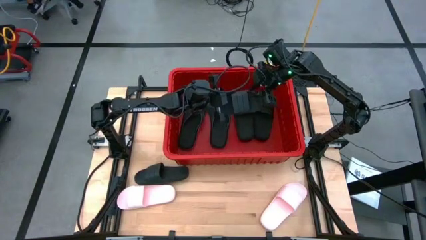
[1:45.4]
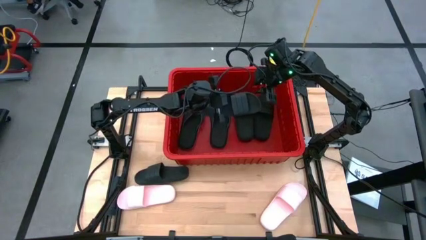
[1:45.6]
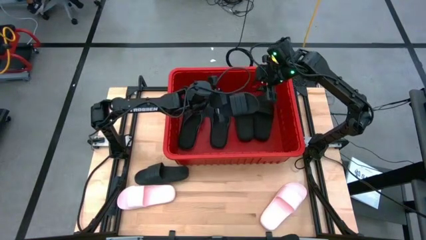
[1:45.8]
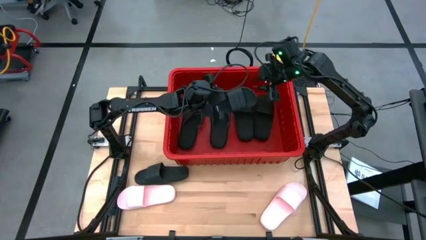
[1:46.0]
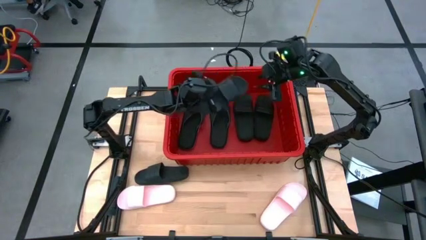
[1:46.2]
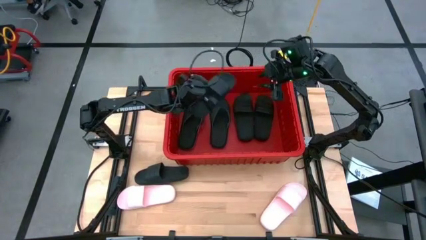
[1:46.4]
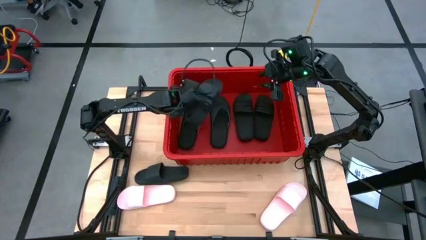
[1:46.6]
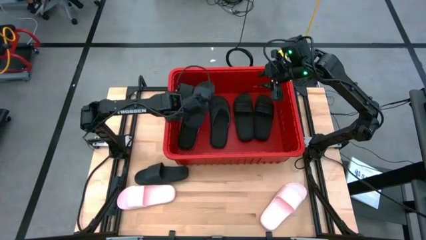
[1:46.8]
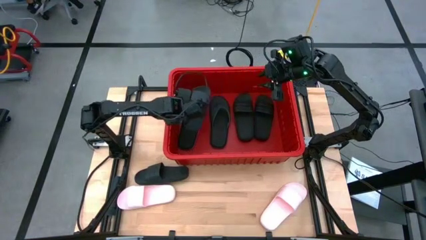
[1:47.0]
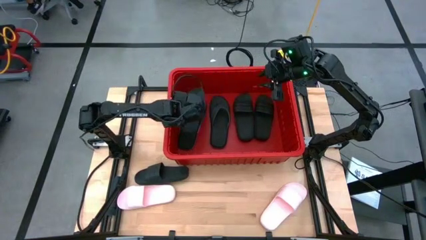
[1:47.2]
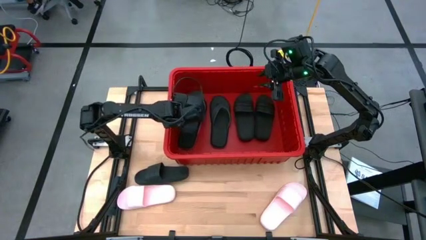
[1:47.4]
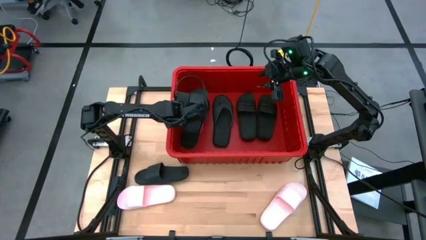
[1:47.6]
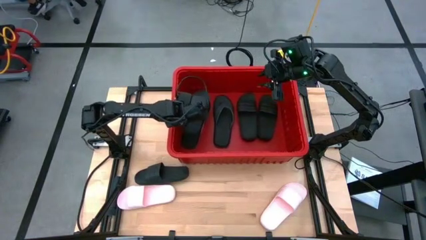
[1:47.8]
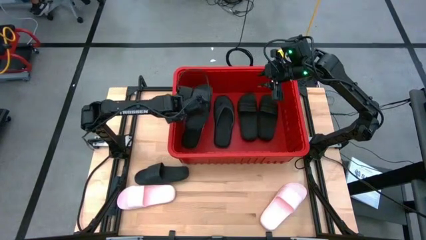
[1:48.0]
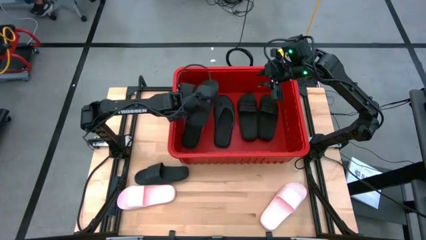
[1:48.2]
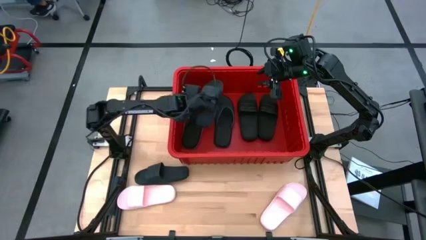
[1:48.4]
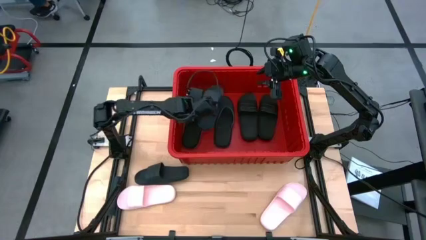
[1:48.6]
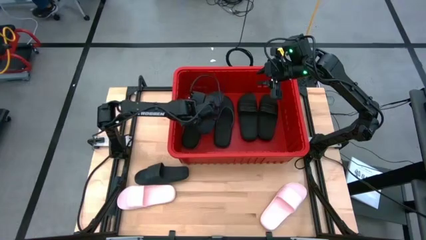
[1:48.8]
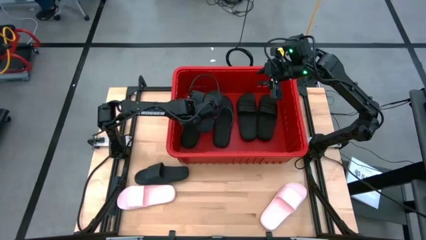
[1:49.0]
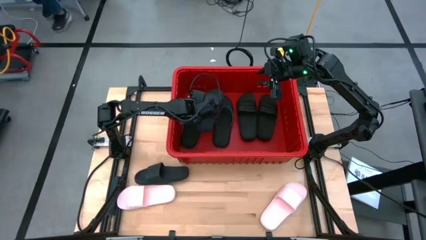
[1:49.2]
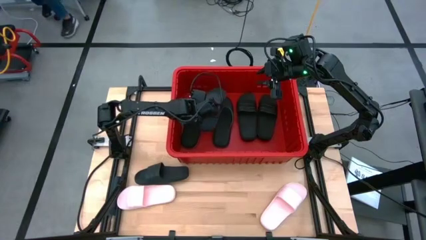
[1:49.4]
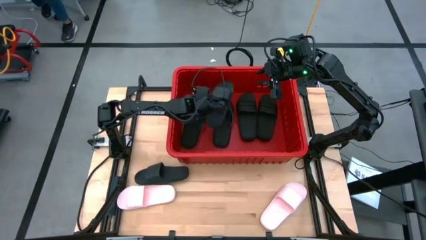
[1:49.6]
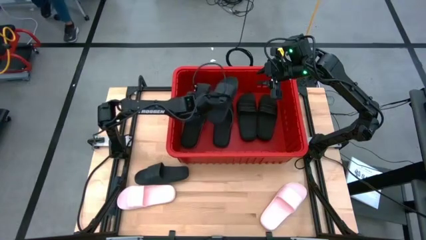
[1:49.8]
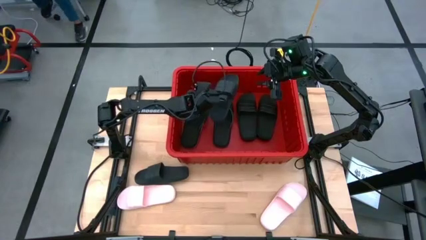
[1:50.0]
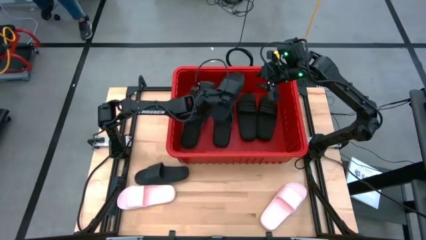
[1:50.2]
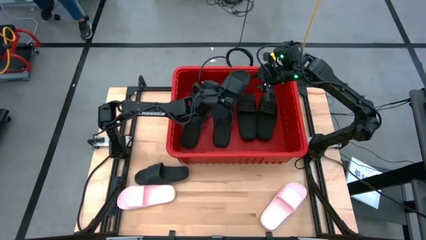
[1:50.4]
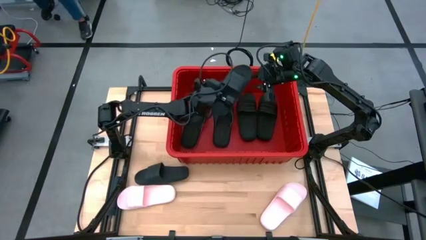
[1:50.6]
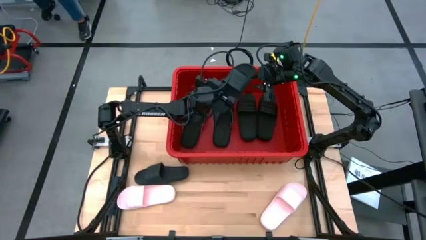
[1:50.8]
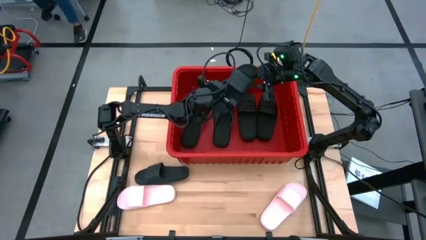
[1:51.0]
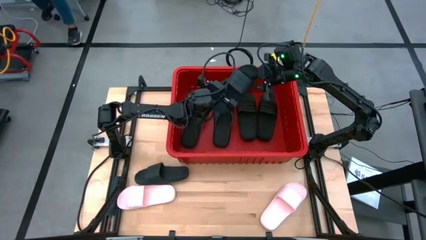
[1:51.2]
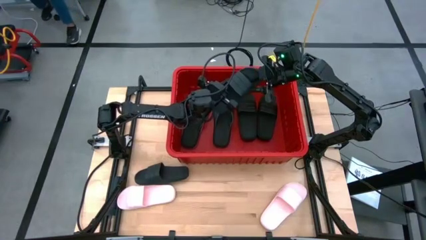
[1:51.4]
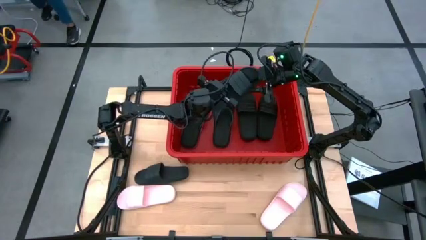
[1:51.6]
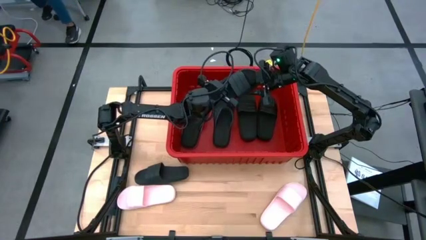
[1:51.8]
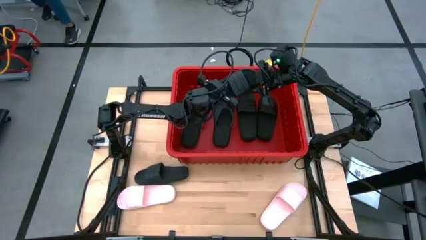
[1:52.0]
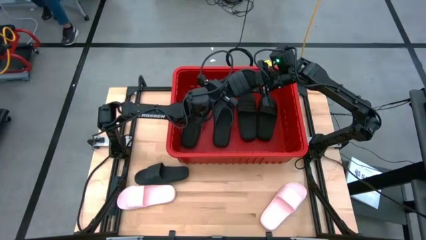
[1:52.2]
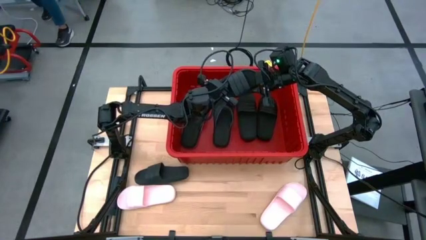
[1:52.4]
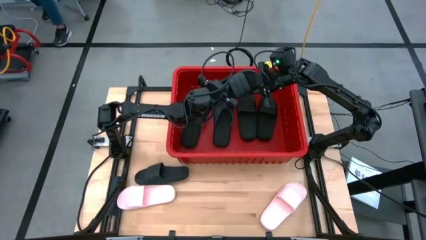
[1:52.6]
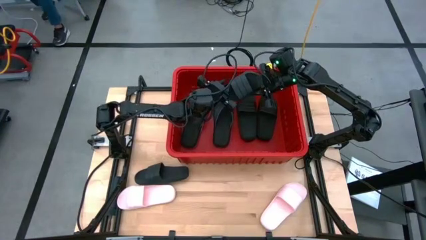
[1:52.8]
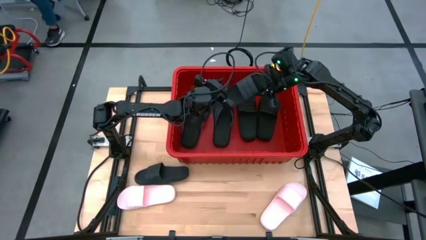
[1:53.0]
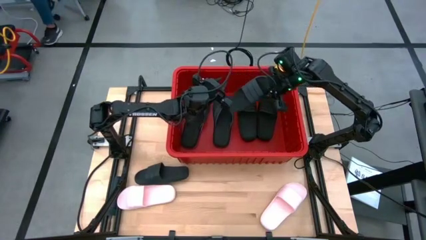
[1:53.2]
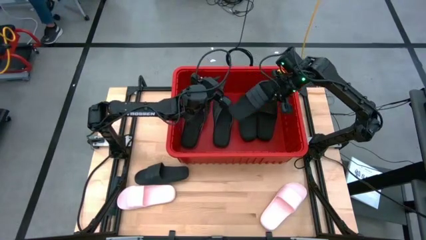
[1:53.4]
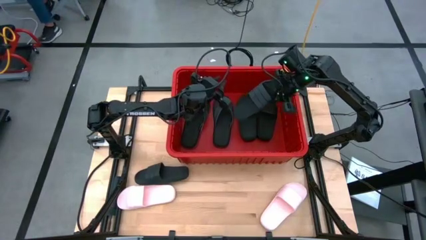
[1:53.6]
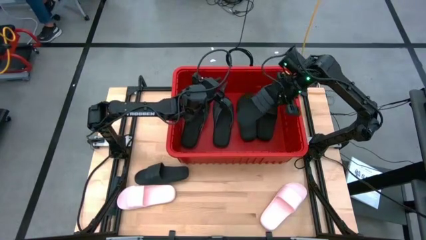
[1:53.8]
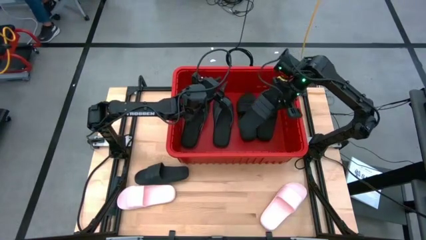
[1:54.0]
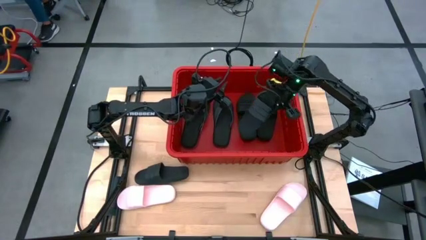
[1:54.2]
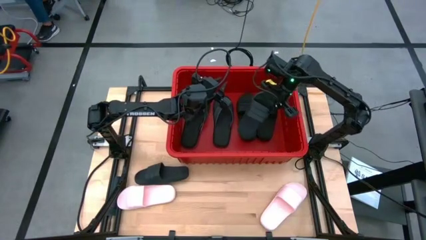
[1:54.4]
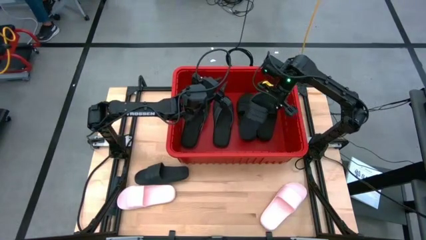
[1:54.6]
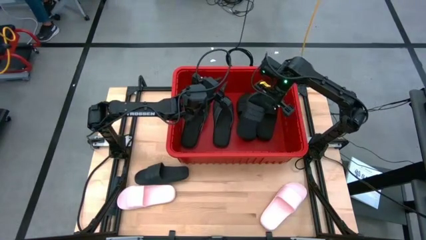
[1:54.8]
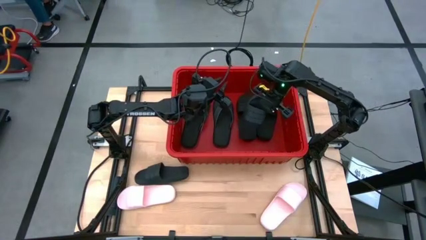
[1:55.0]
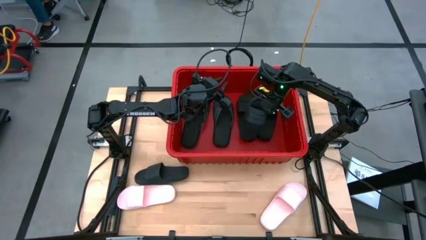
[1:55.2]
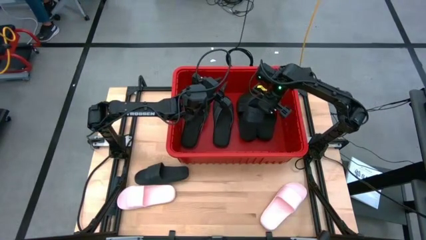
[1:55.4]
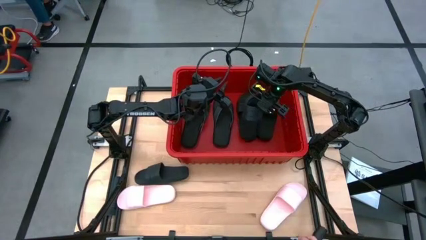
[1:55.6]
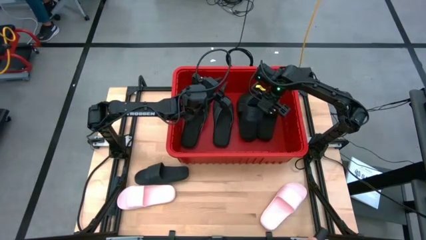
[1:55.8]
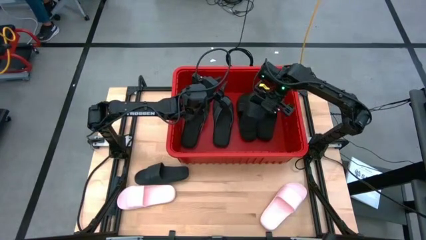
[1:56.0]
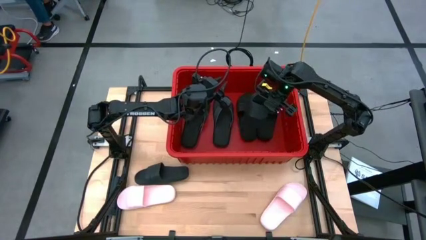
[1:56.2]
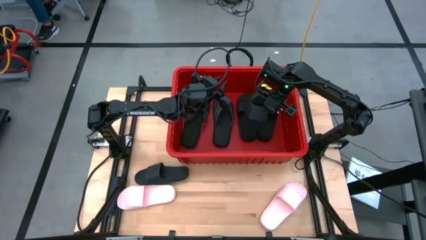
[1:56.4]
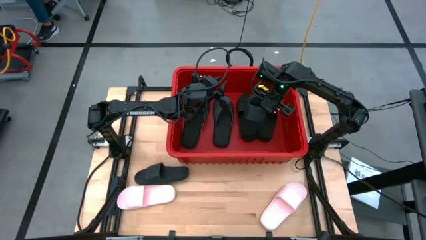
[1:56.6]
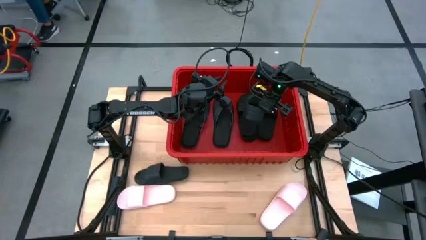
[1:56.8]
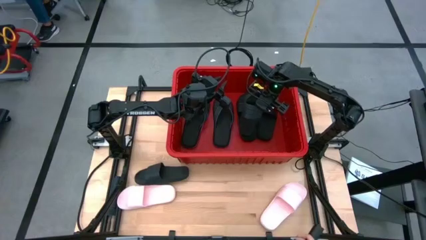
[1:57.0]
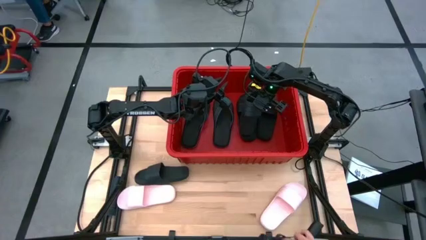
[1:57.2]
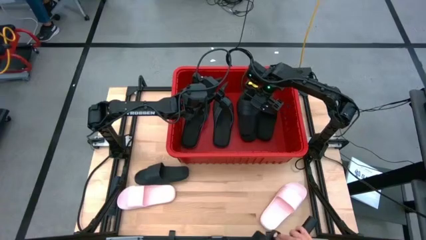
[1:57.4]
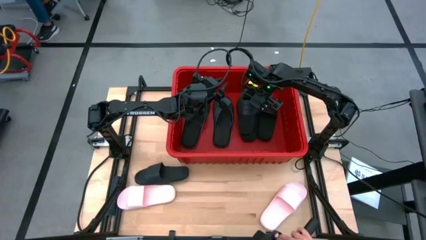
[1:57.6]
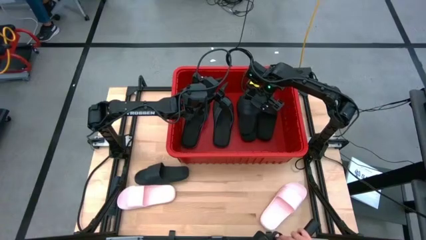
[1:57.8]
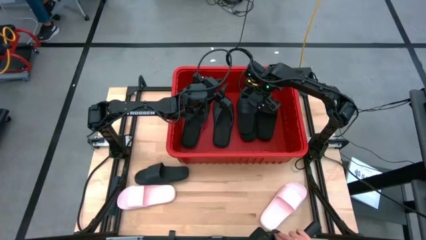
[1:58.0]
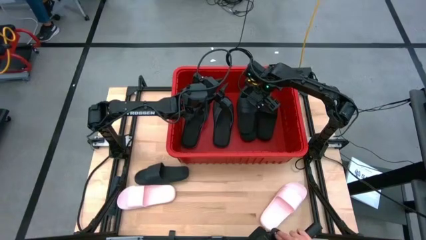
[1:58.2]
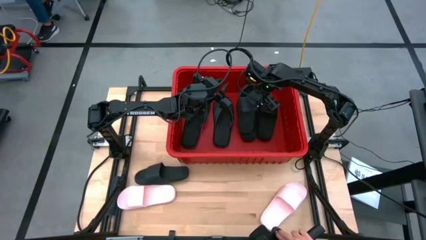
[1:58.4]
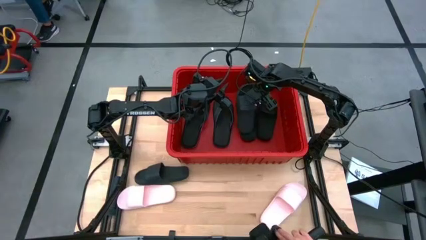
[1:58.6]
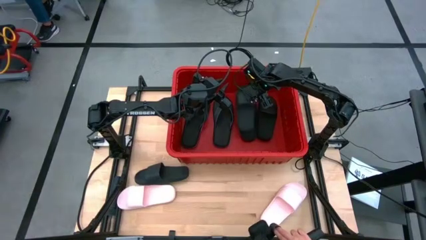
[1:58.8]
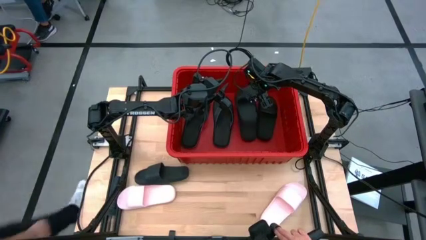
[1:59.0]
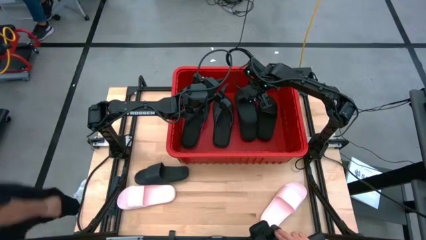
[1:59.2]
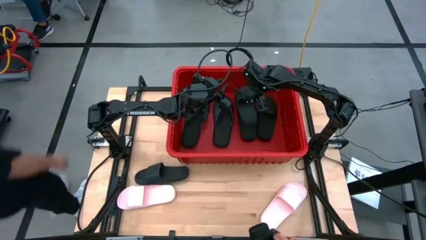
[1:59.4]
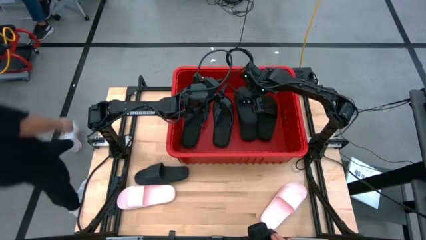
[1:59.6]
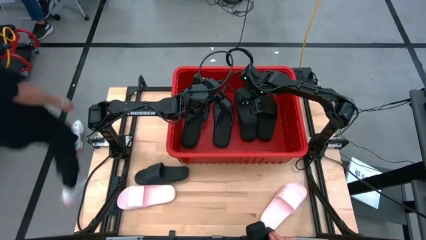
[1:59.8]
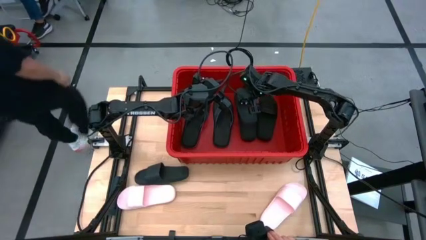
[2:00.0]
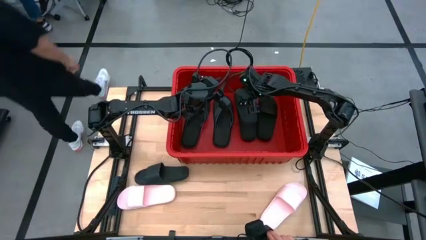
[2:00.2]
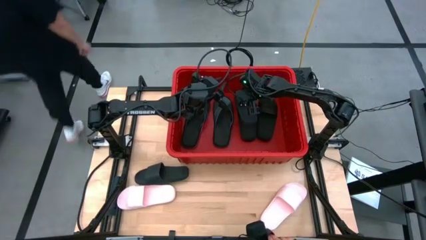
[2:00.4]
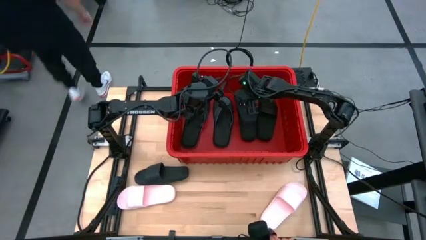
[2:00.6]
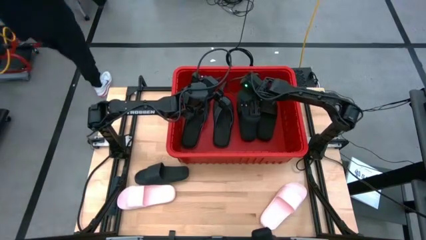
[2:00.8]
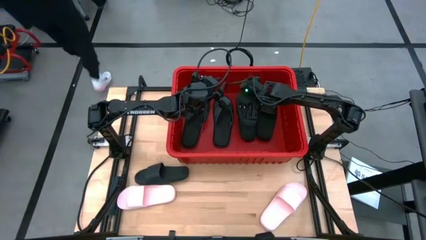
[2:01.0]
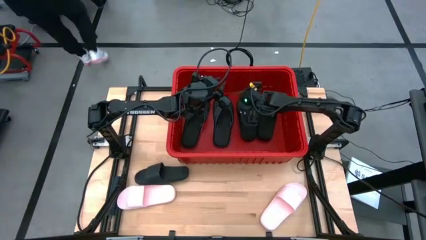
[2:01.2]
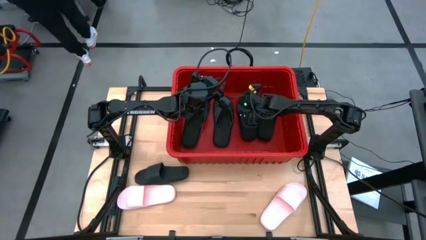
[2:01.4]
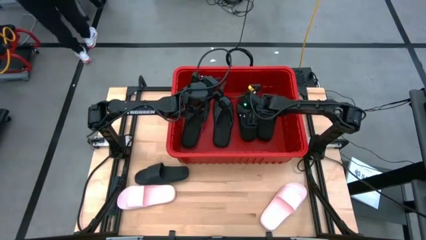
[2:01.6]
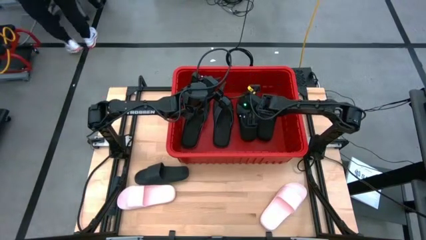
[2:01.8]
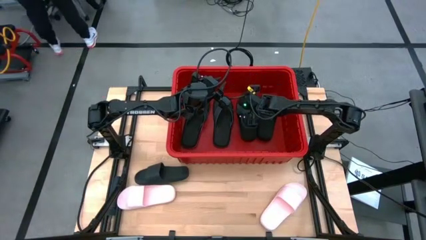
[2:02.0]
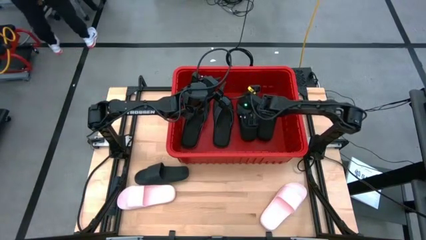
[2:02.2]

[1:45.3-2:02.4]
Task: Pick and place slides into bin
Put the black slide into the red bin
